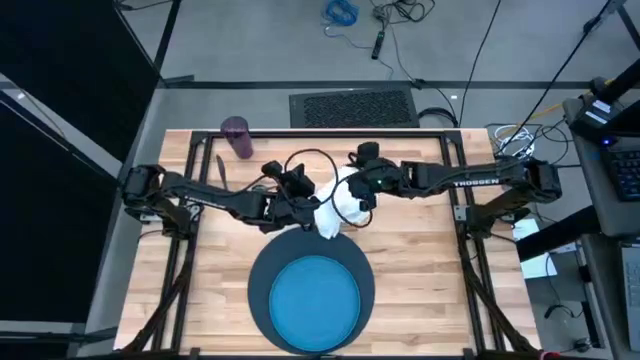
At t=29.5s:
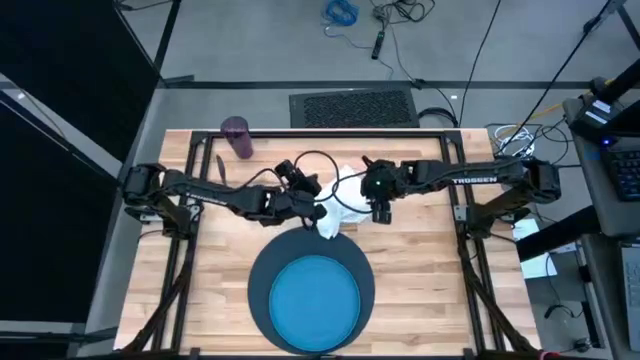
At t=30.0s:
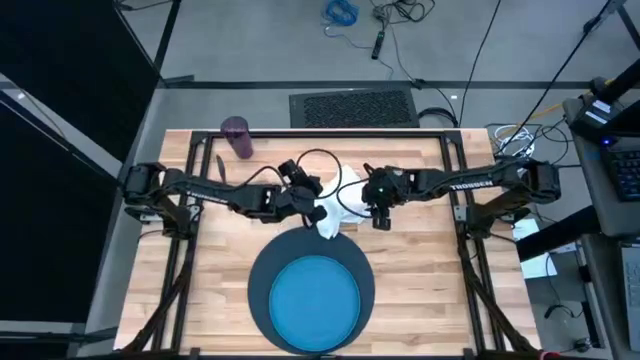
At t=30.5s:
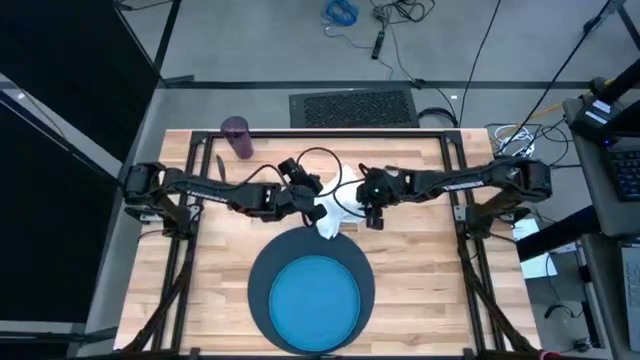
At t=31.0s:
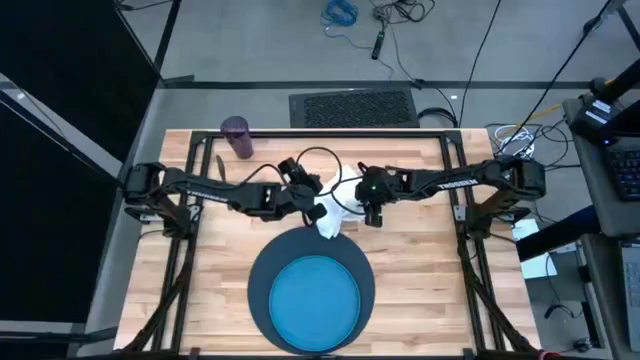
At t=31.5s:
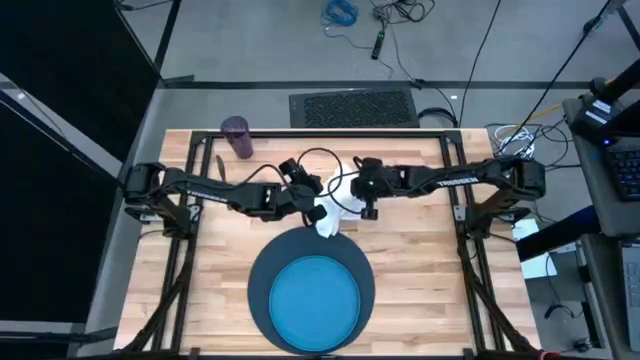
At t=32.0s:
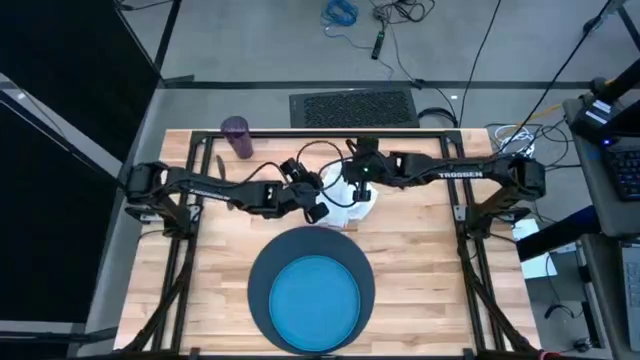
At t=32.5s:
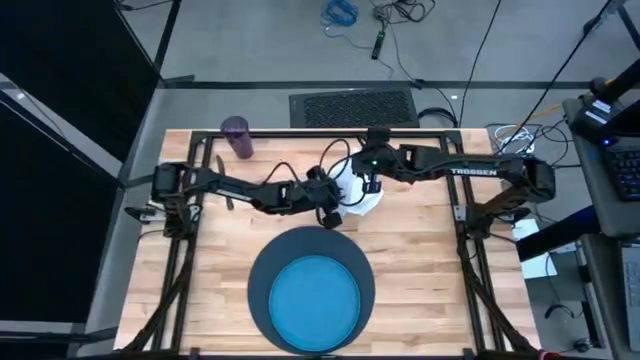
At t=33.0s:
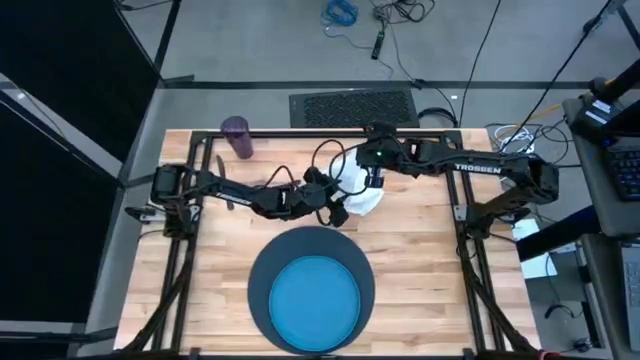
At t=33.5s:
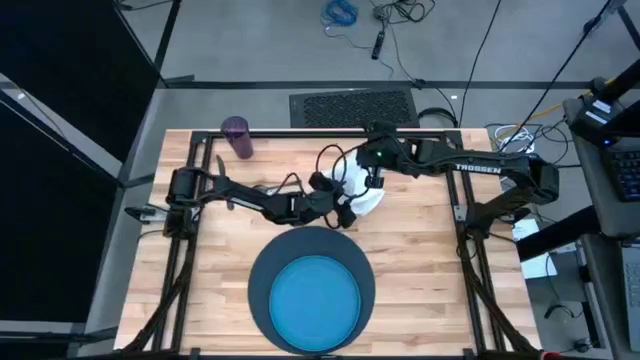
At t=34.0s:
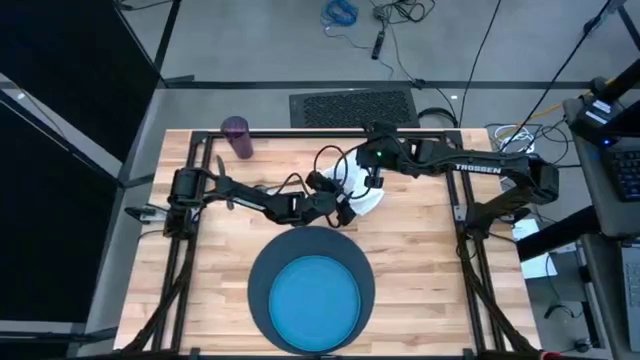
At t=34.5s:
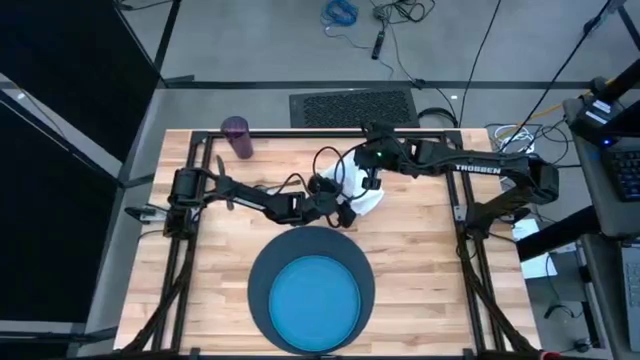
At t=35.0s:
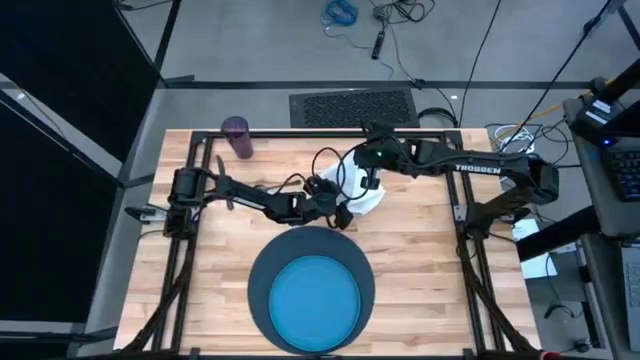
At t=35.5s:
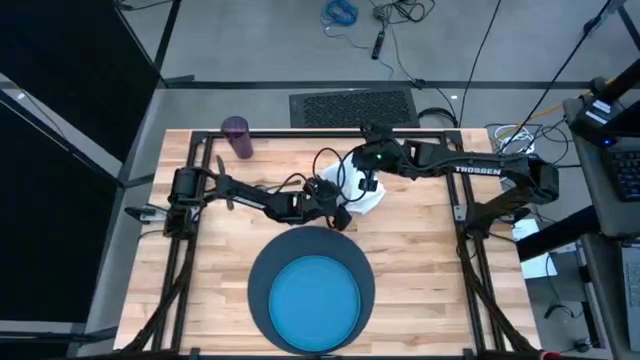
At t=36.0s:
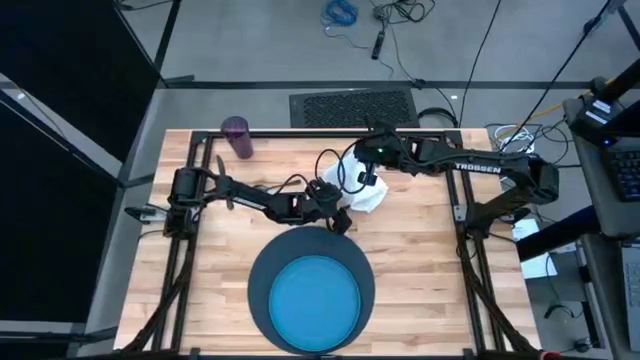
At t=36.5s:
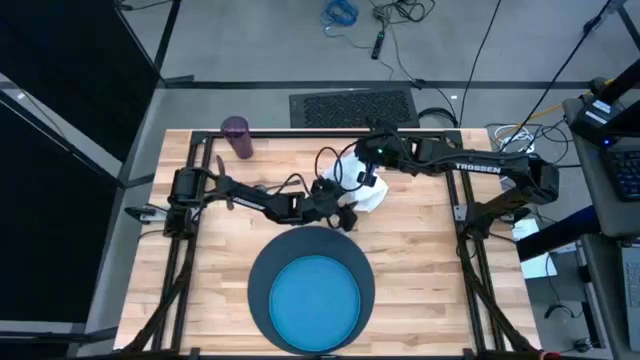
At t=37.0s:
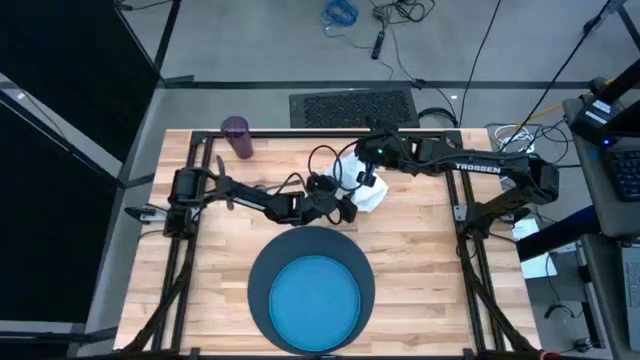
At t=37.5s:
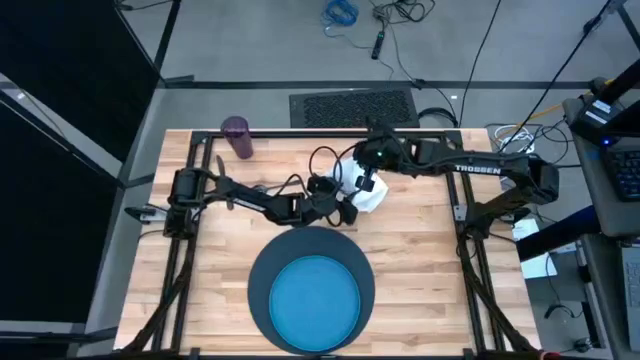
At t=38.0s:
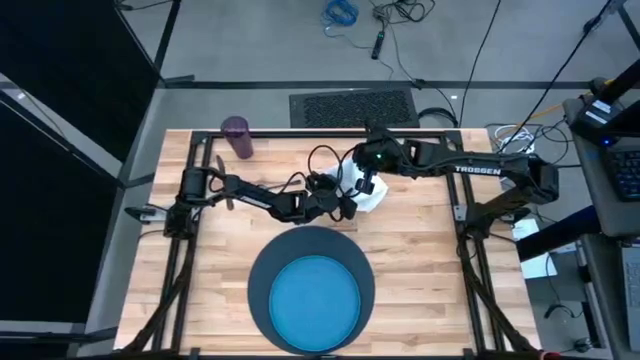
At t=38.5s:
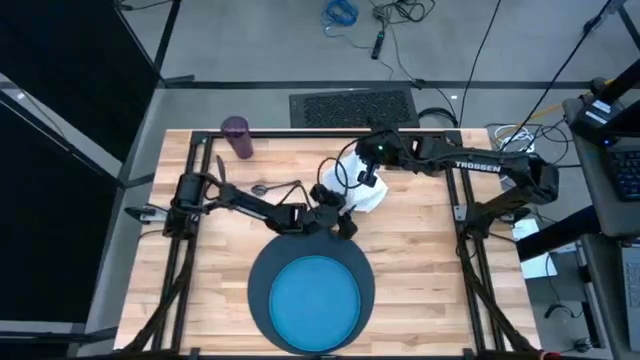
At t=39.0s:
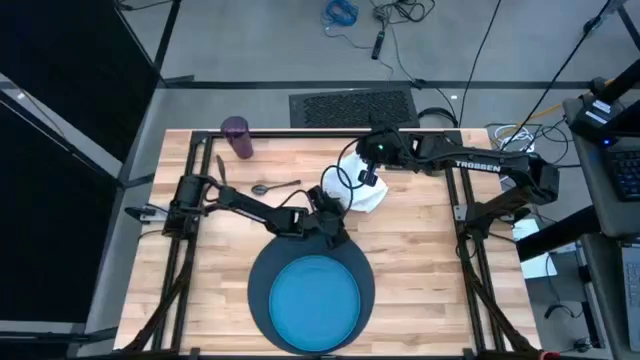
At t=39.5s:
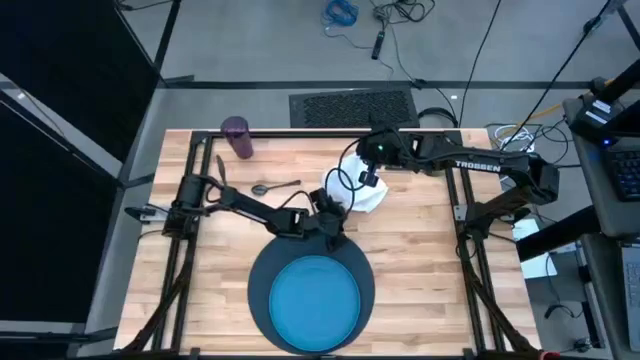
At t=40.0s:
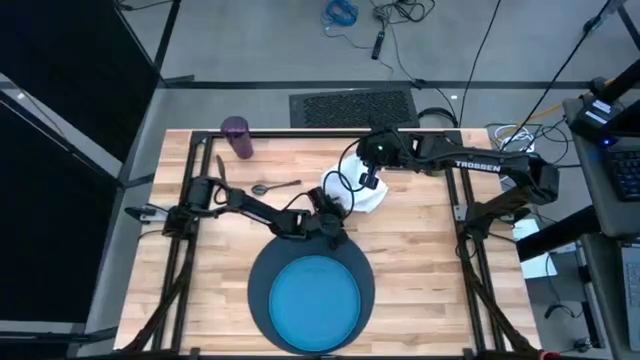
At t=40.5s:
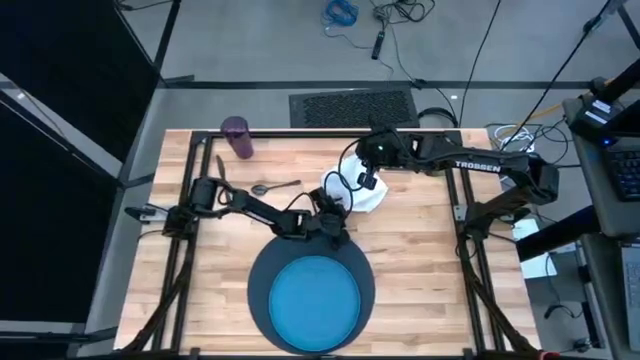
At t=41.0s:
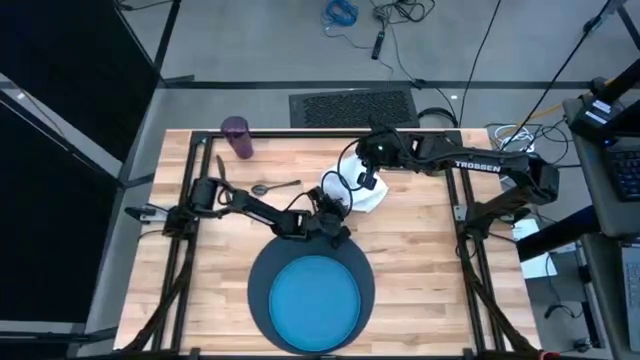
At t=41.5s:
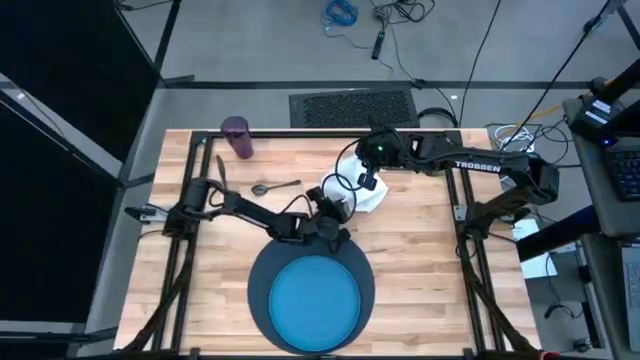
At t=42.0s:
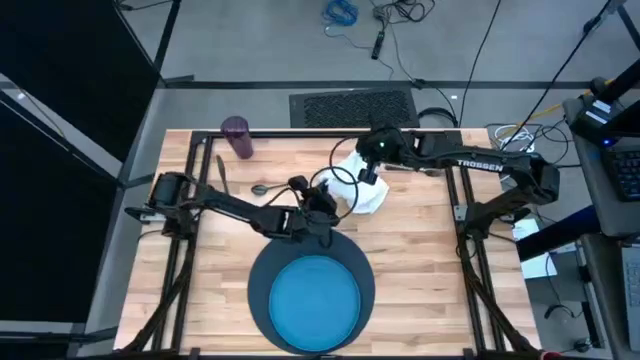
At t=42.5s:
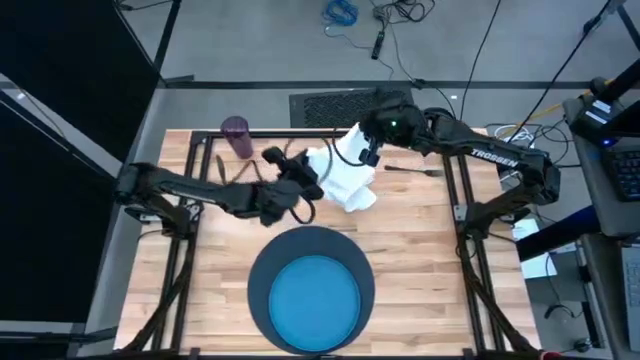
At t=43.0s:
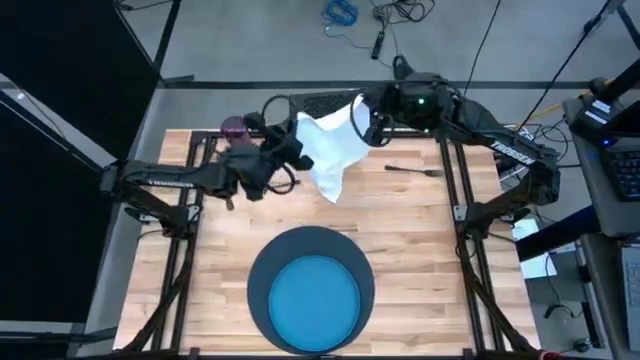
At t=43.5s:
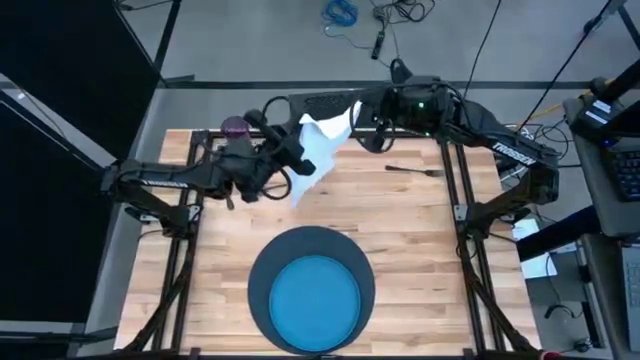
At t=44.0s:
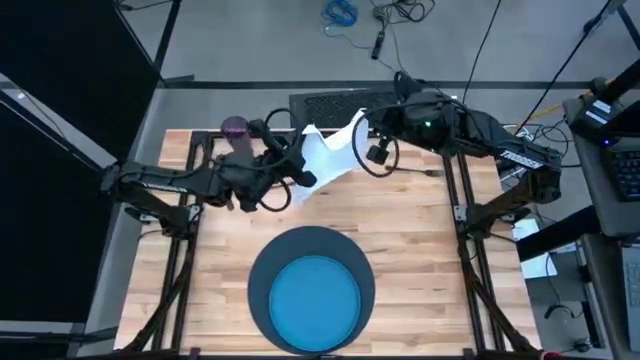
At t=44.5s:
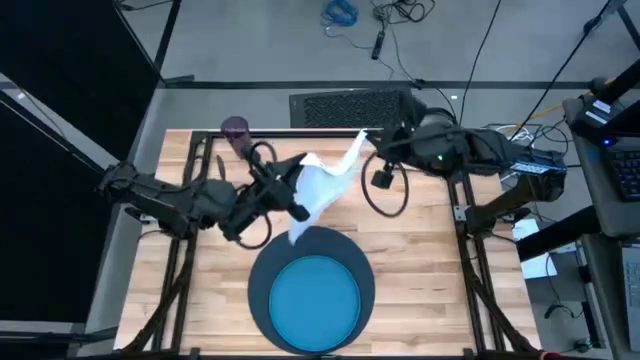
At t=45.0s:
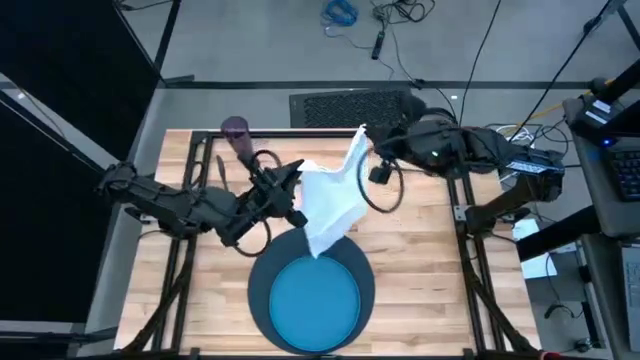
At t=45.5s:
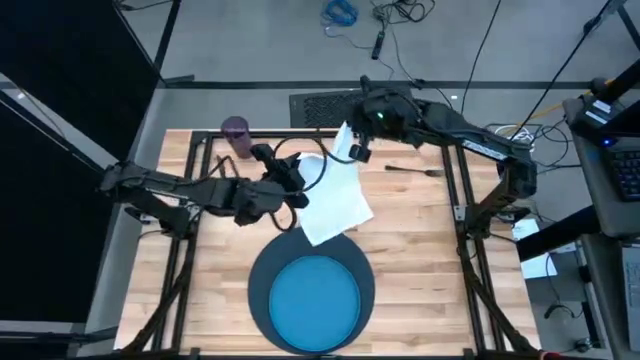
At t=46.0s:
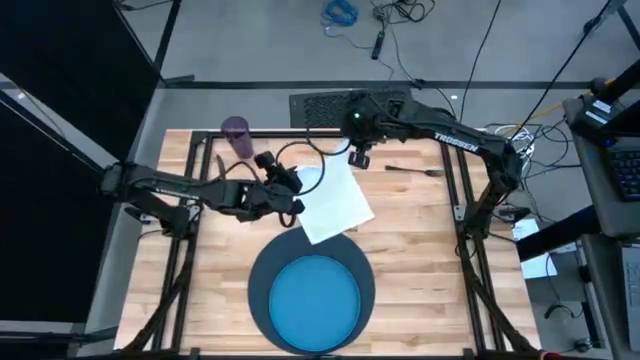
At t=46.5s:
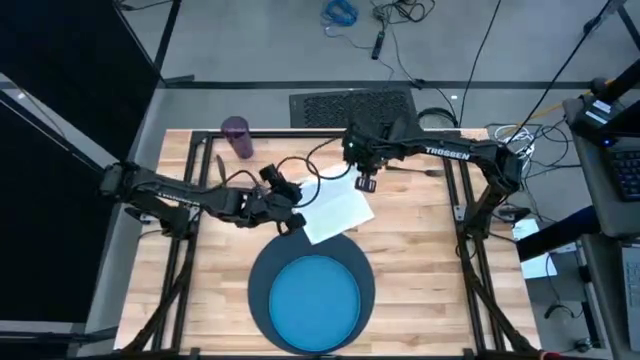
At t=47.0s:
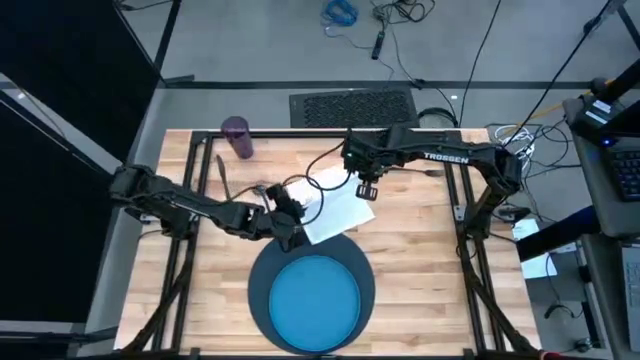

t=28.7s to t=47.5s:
Task: Set table place
Fold the white napkin
